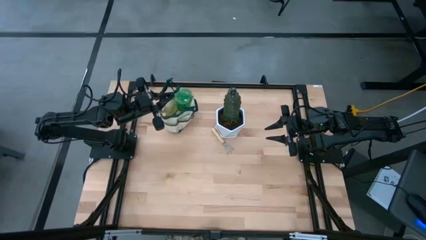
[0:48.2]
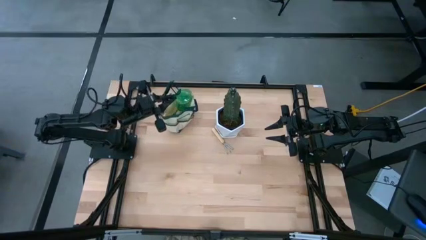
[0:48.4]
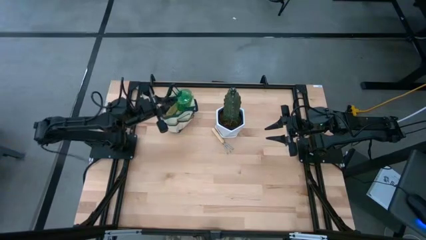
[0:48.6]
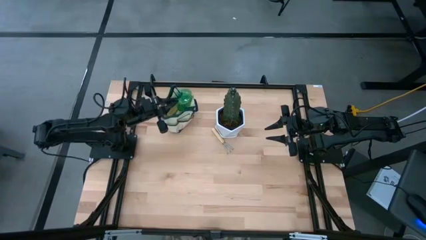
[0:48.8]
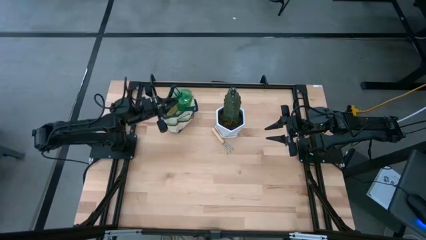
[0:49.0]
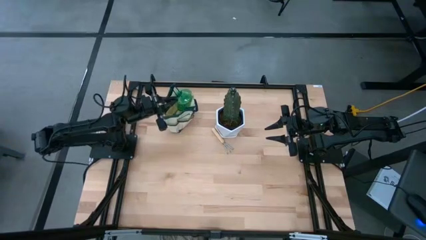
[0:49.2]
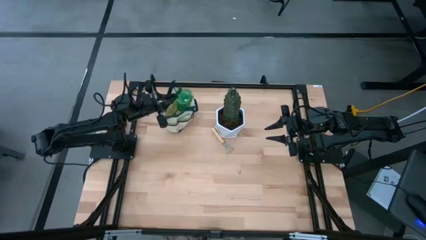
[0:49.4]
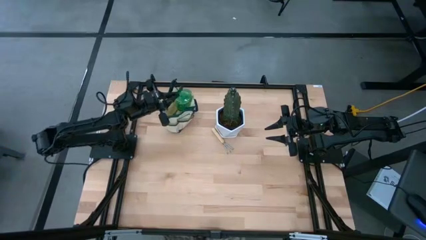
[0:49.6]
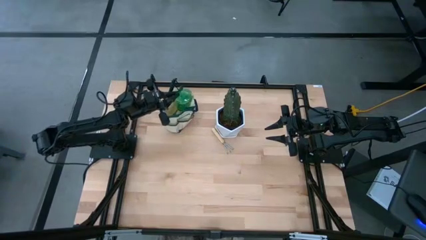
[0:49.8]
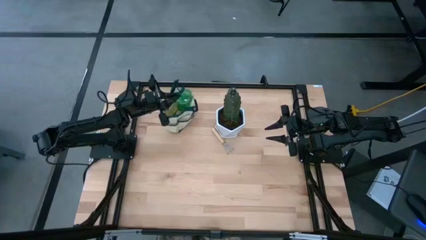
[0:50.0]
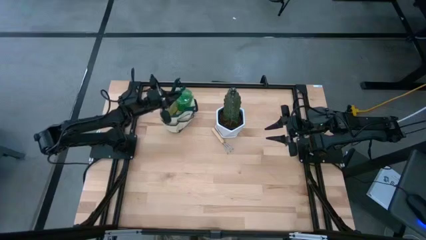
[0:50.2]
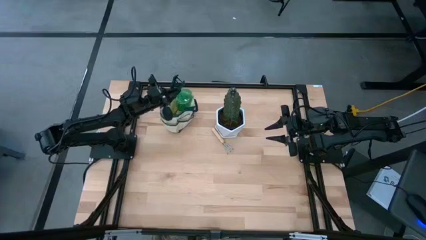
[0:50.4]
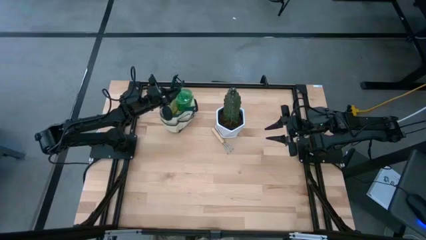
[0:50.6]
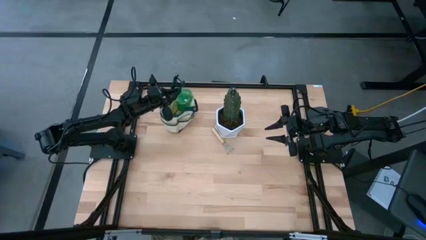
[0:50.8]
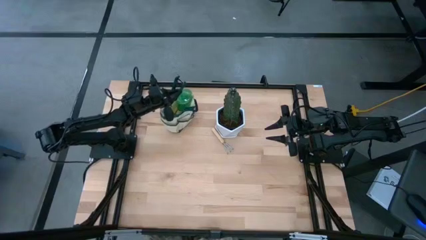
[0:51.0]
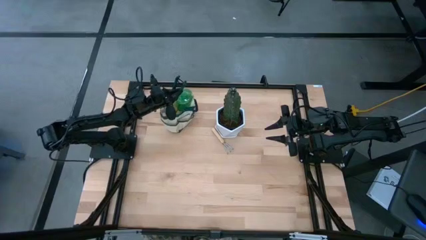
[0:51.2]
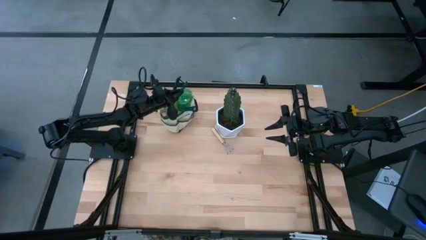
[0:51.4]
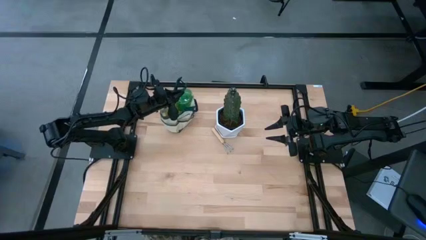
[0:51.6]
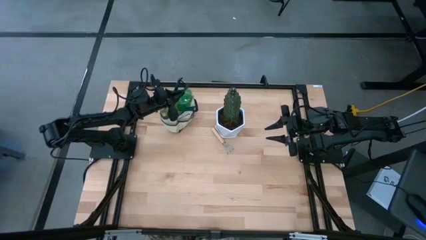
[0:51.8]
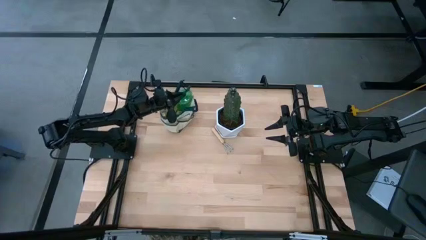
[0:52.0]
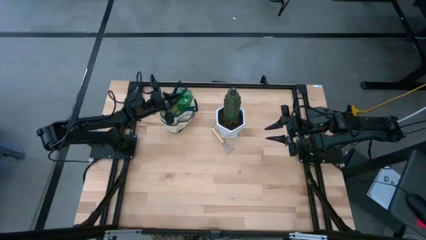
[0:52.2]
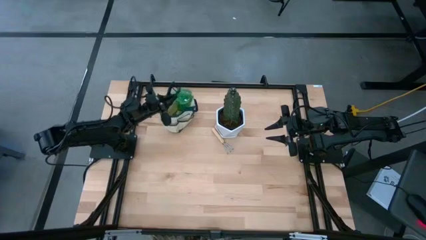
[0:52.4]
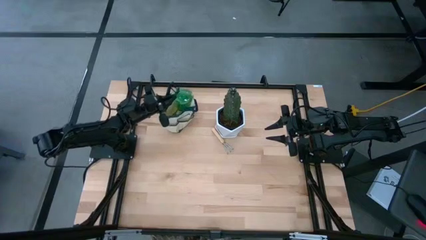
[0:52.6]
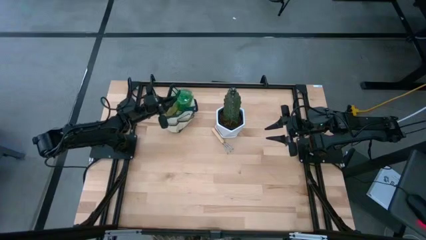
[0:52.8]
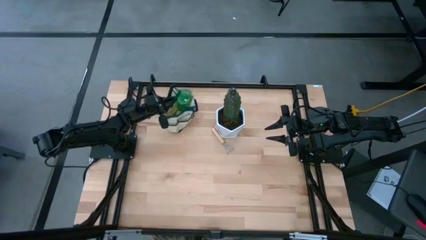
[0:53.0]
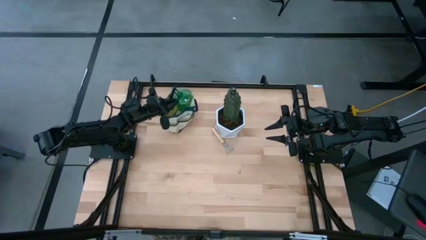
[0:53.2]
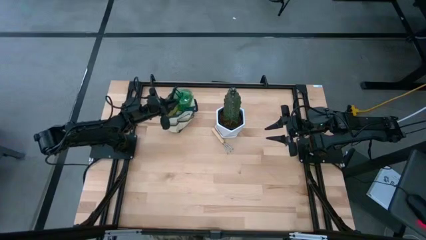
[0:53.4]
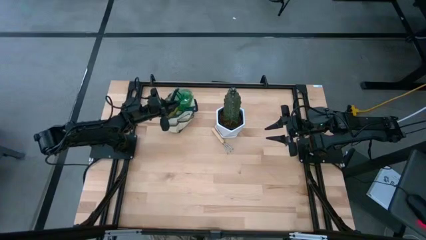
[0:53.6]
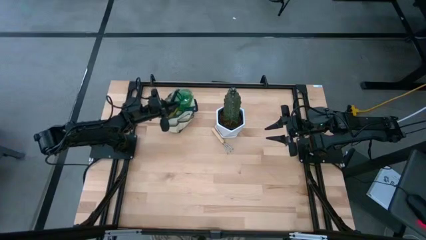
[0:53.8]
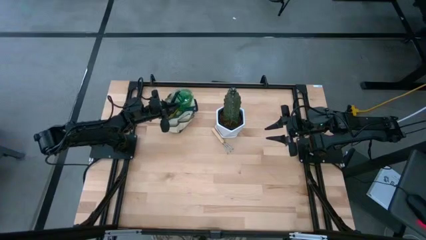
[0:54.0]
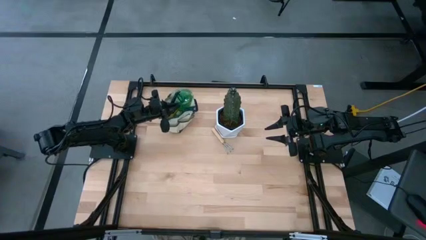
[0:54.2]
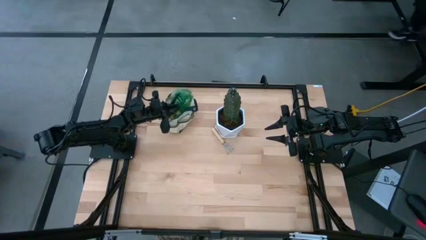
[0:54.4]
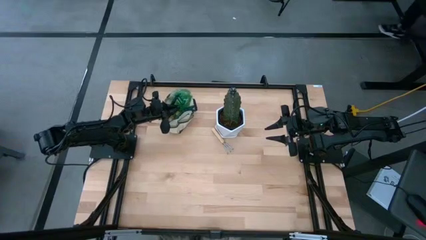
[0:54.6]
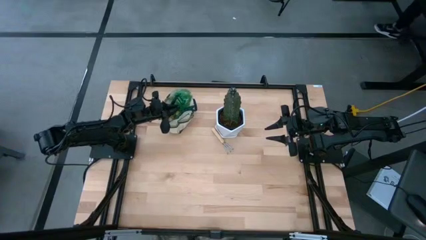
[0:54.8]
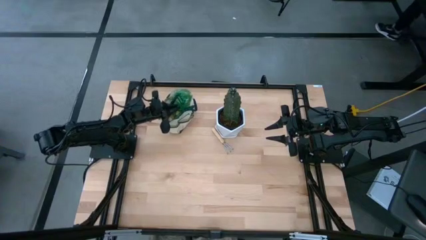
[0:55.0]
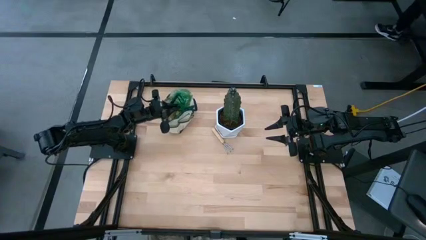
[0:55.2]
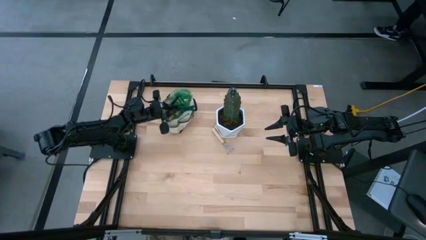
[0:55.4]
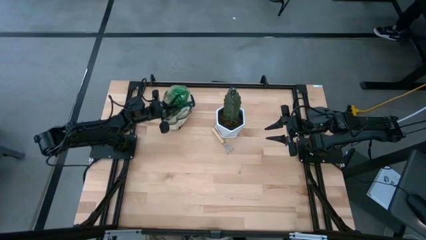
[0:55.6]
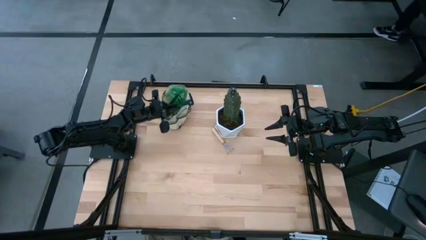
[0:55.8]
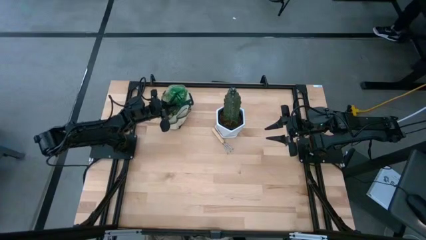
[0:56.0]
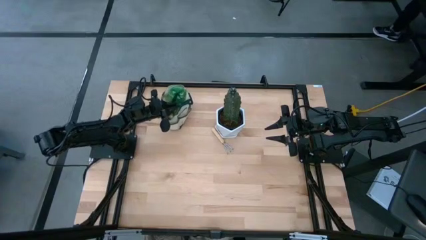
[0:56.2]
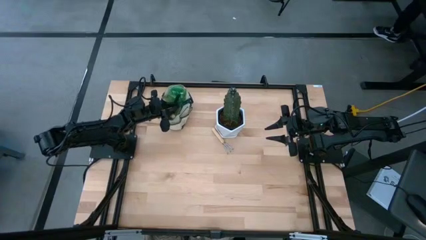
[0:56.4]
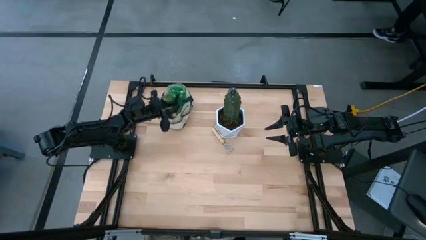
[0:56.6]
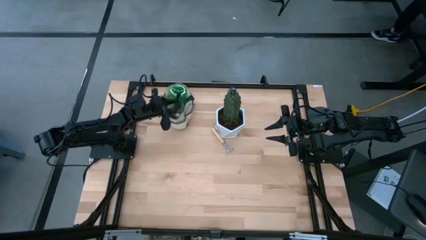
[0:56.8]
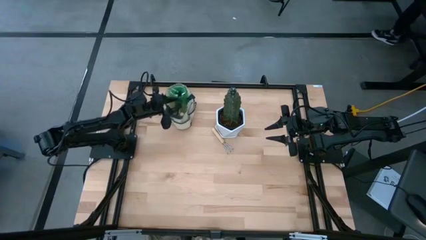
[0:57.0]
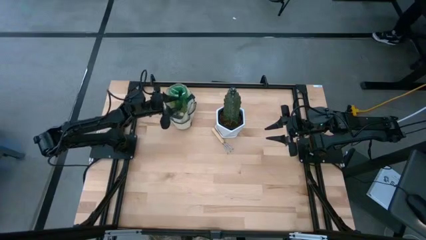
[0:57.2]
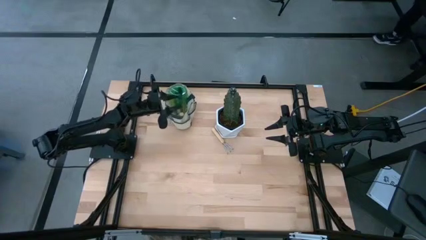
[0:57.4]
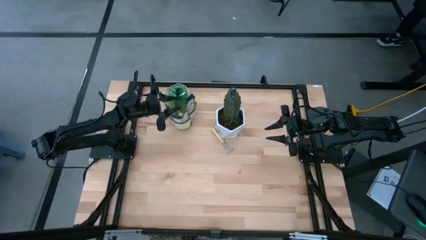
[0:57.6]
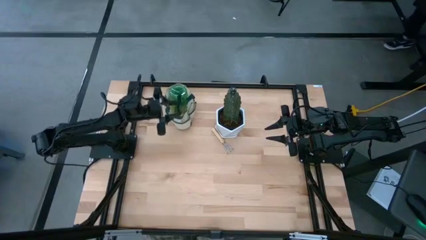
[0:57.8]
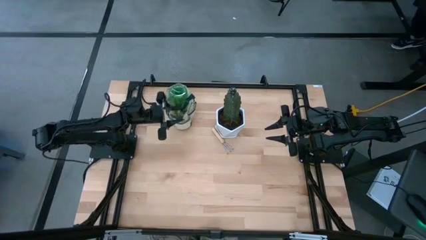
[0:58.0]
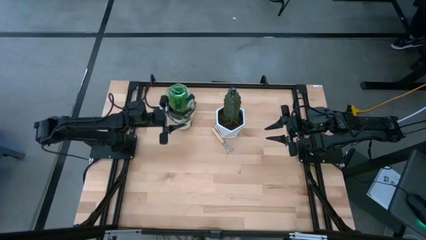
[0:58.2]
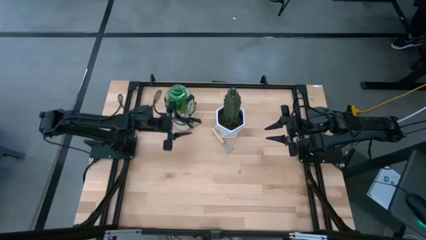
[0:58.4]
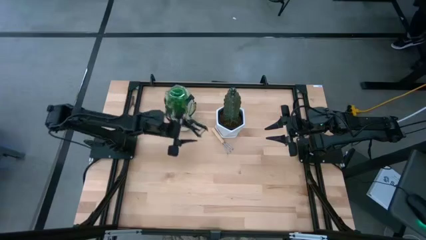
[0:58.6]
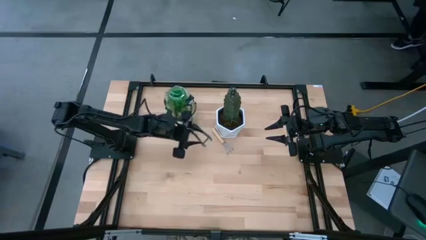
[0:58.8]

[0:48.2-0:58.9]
Task: Pick & Place Garden tools in Gardening bag
Put the green shear scissors into the brown gardening bag

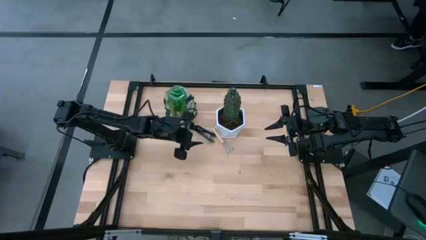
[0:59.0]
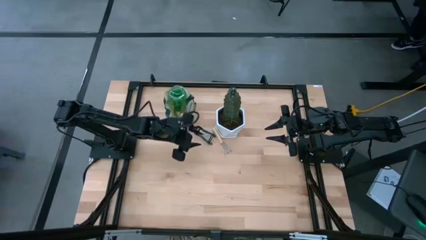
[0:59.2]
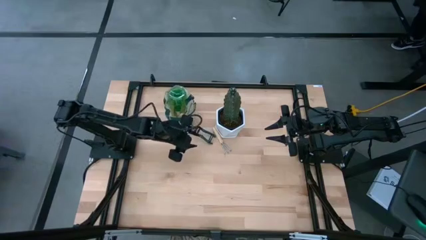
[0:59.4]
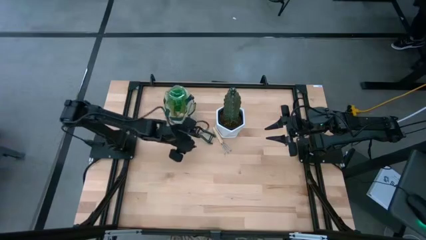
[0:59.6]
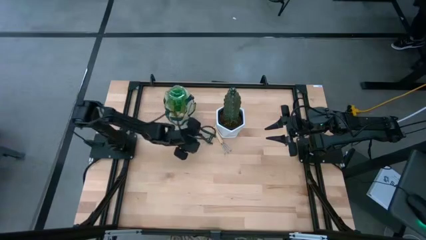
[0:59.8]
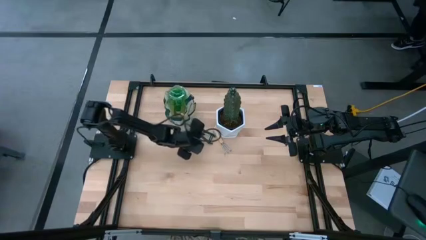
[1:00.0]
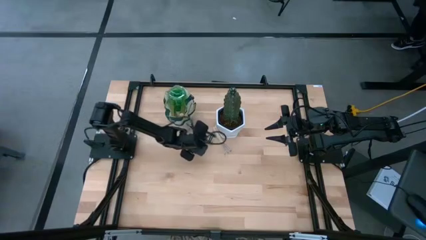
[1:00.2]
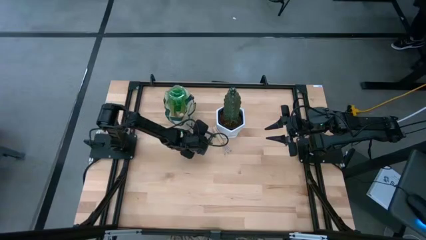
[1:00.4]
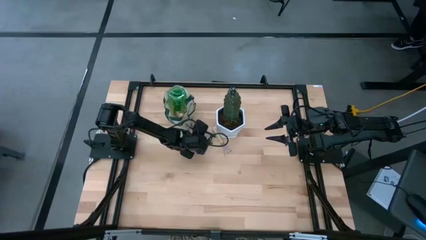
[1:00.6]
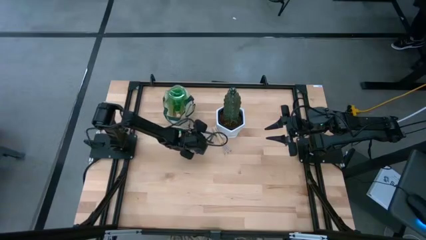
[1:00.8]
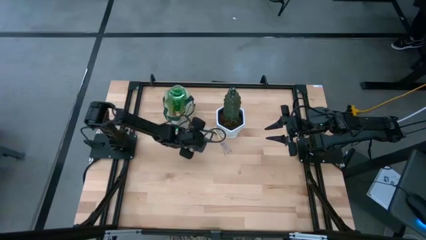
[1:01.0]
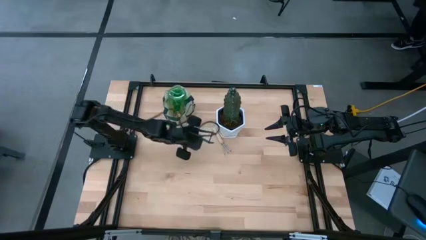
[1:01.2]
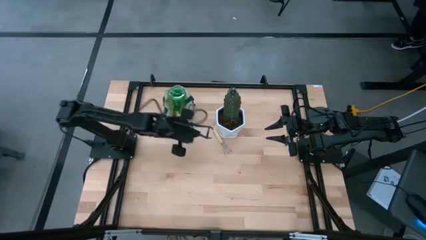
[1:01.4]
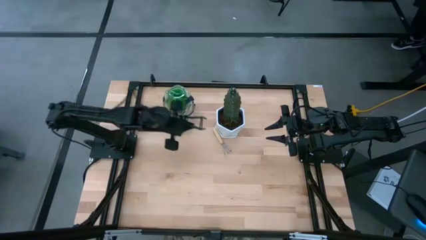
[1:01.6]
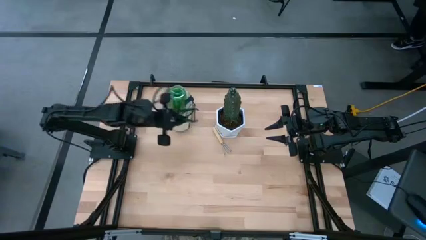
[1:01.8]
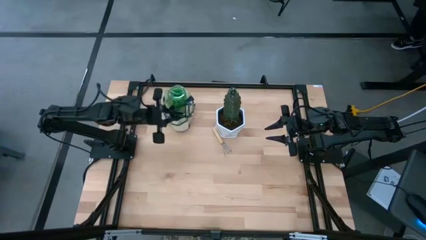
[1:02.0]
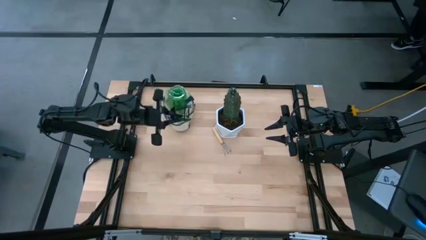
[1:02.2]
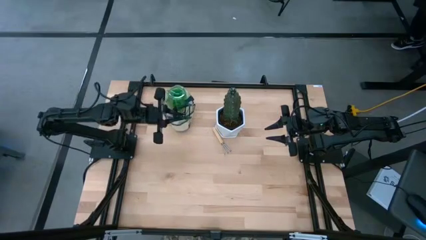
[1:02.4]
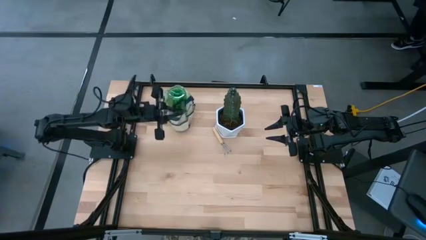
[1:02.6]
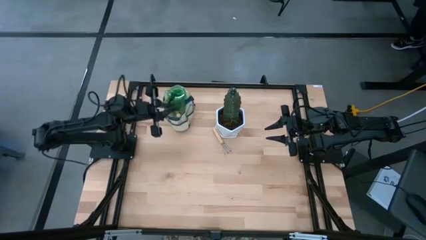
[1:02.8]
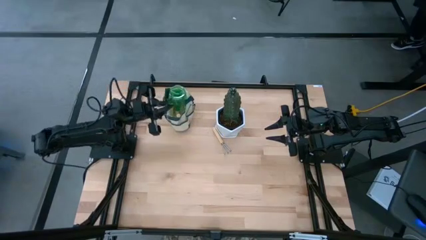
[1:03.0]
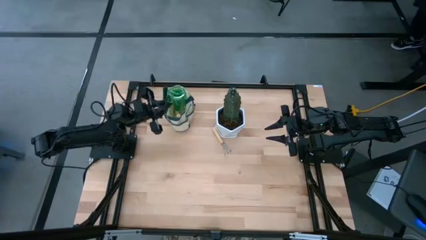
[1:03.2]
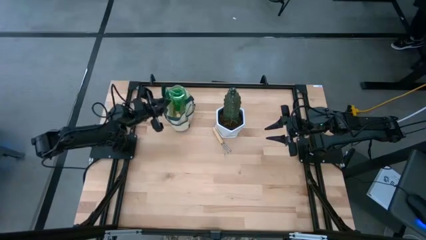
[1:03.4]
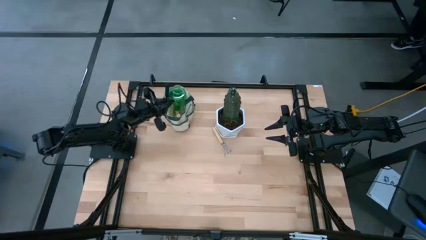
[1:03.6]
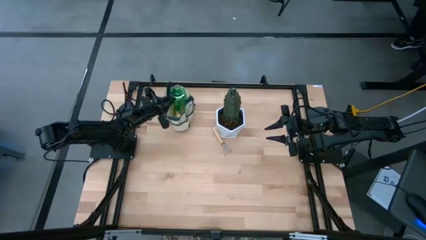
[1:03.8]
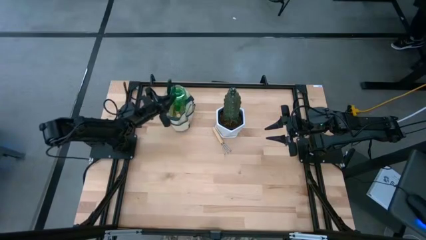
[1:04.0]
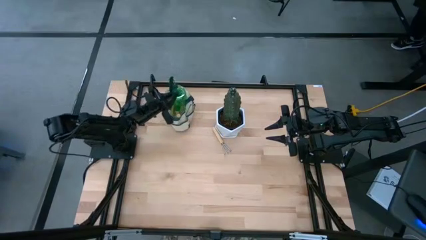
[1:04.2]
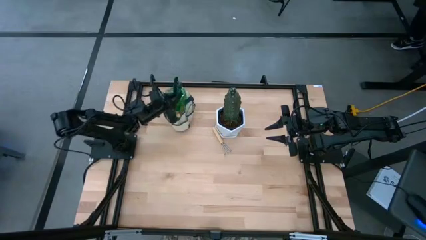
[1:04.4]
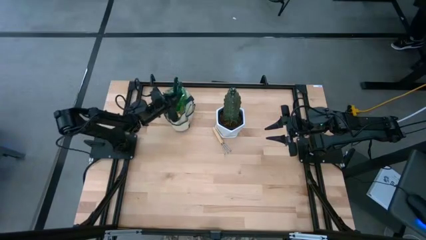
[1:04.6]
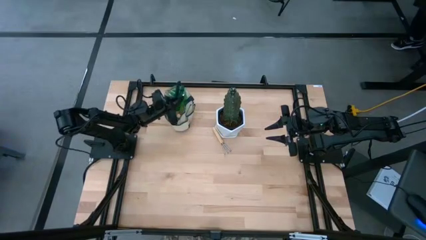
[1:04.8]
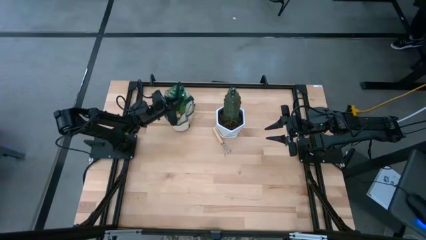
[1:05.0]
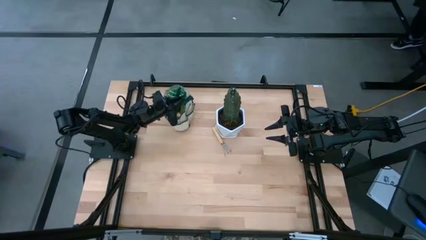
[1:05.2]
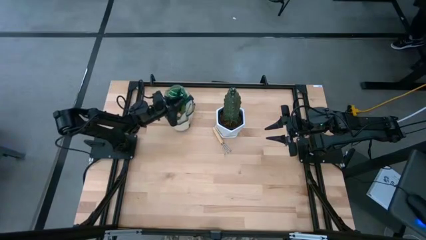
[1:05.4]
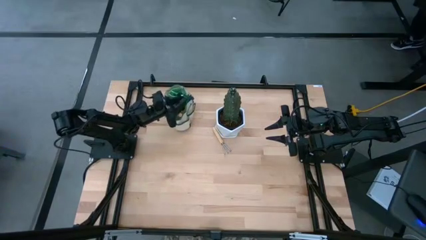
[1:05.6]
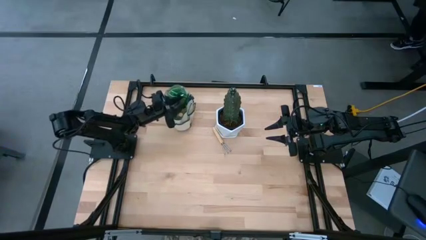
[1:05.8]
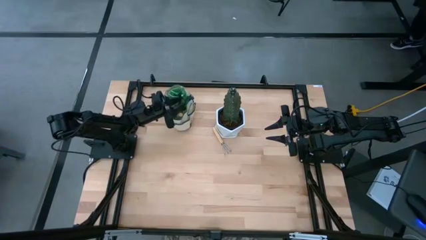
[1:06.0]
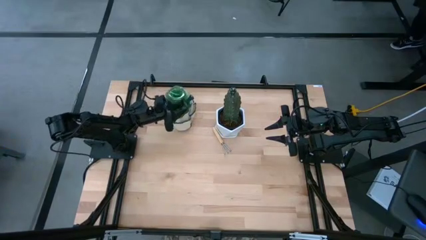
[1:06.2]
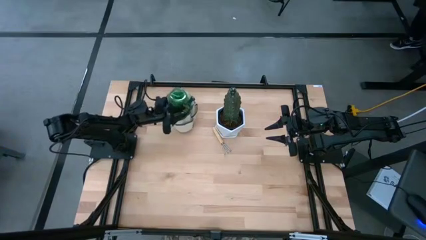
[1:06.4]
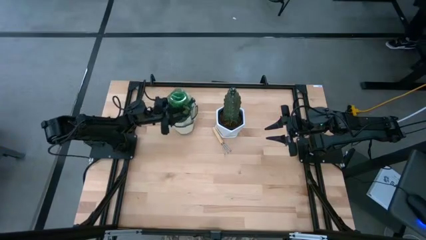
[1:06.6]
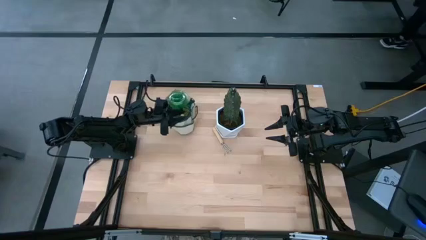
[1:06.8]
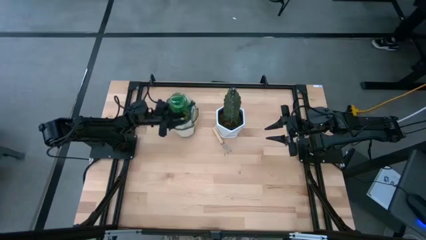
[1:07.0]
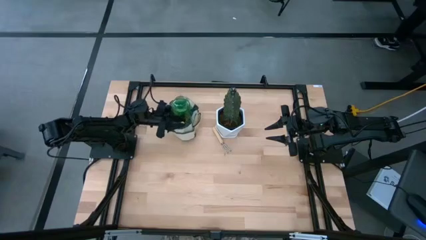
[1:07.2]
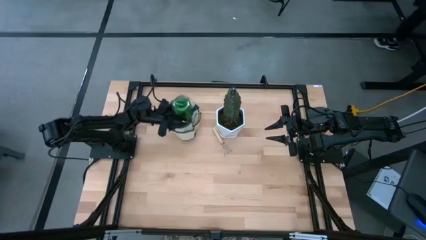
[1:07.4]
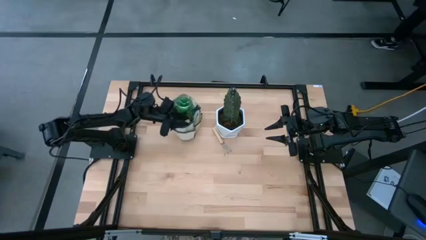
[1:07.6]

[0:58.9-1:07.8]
Put the green shear scissors into the brown gardening bag
